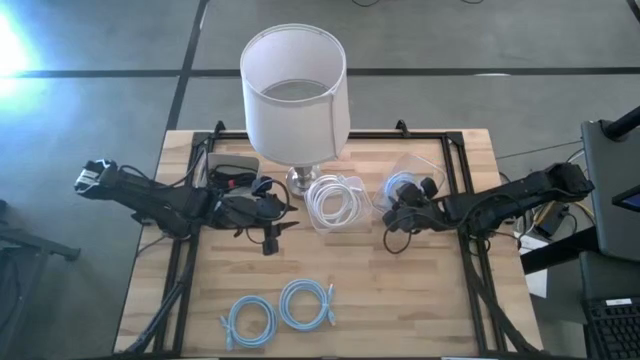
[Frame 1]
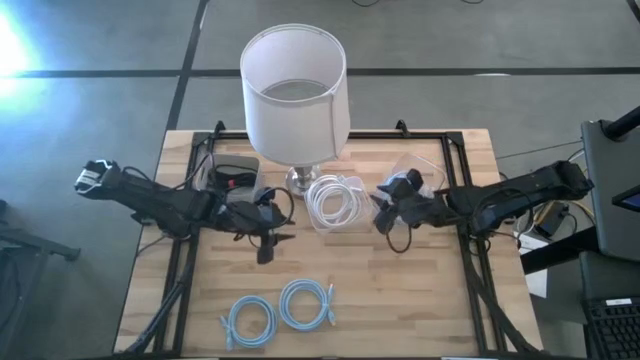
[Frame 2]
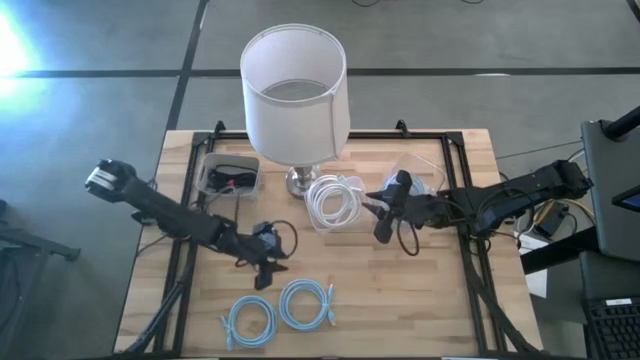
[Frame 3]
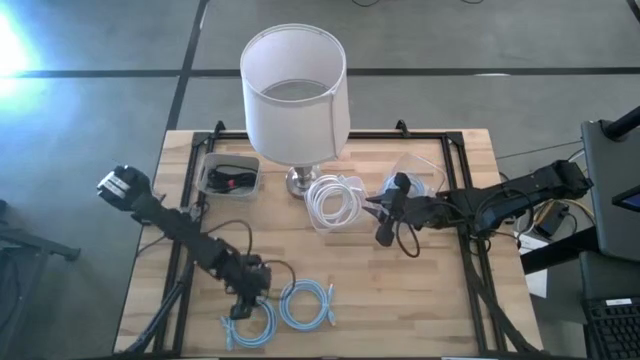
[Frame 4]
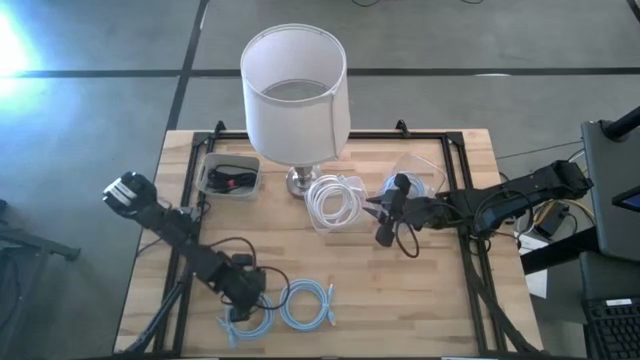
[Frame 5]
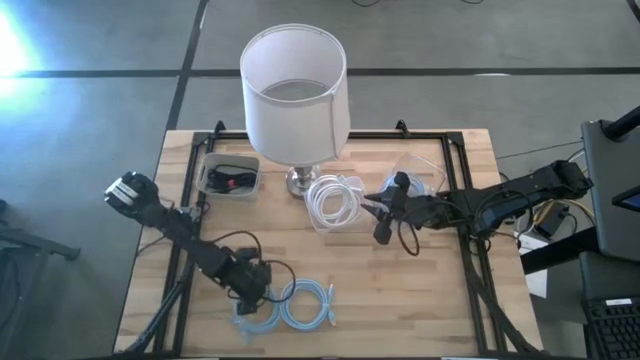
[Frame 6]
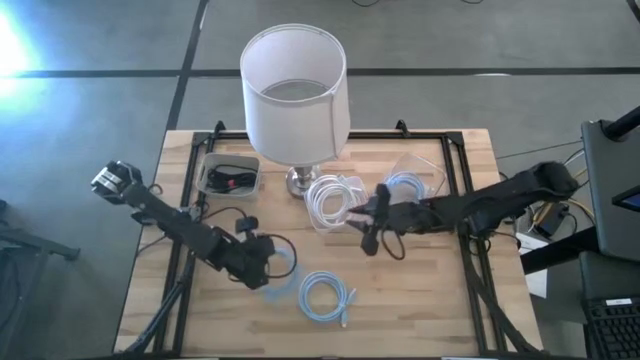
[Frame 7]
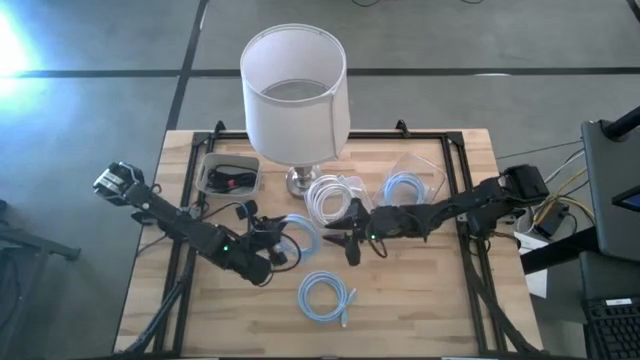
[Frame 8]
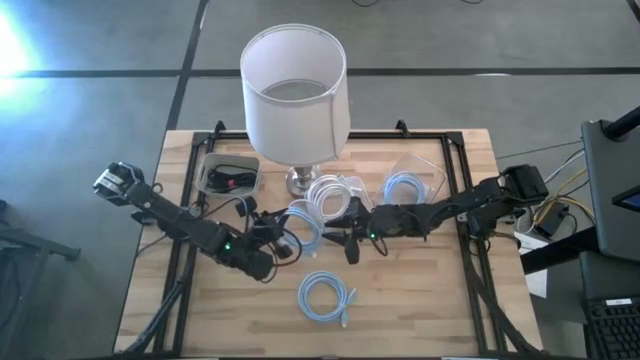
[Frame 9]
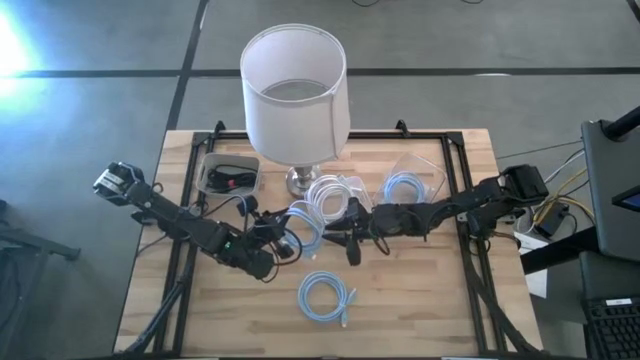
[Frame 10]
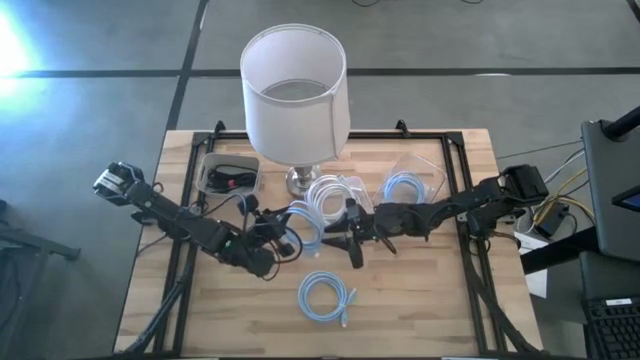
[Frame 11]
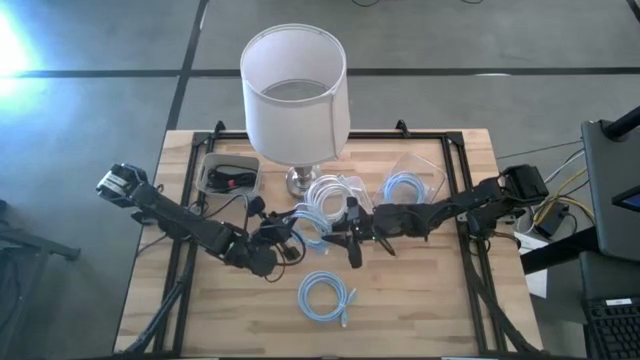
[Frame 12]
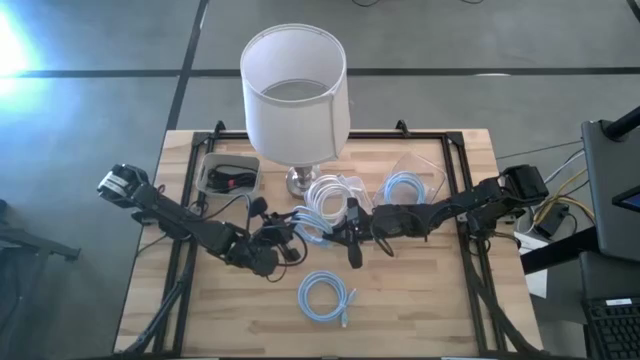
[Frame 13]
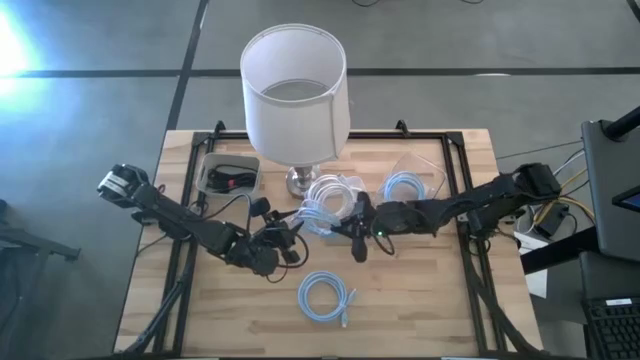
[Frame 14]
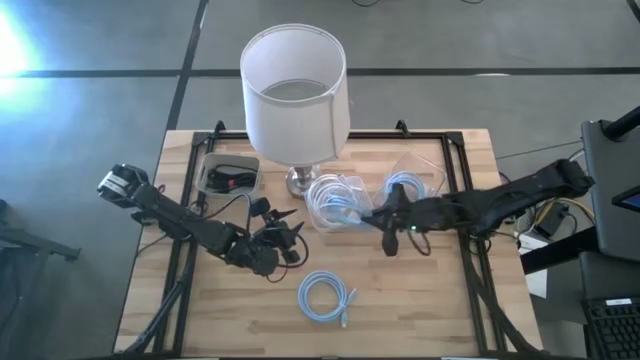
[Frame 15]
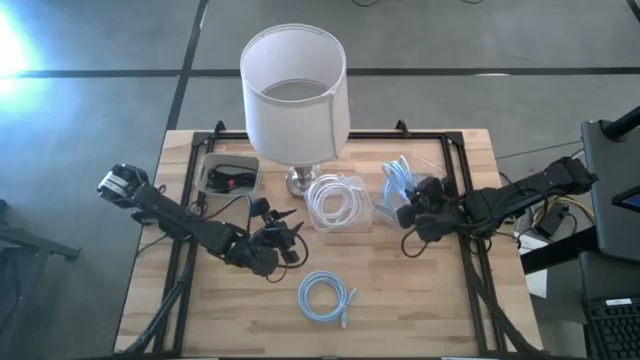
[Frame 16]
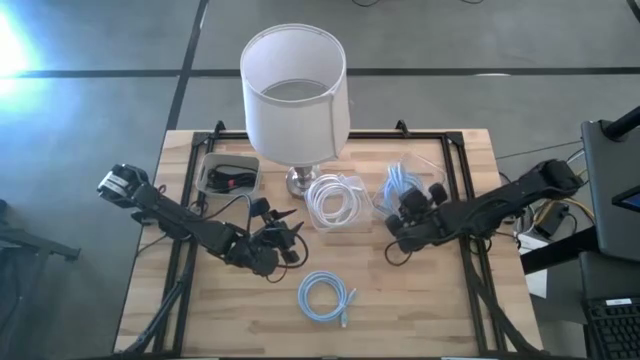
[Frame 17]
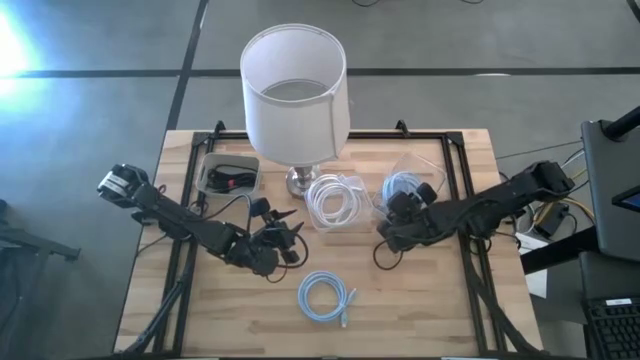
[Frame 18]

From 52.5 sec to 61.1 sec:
Task: Pick & Place USB Port
Put the left light blue USB cable into the right transparent bin

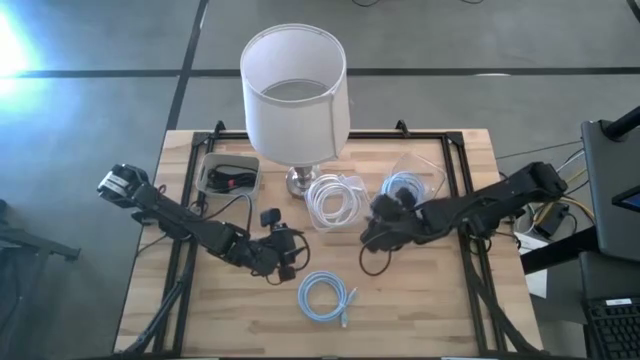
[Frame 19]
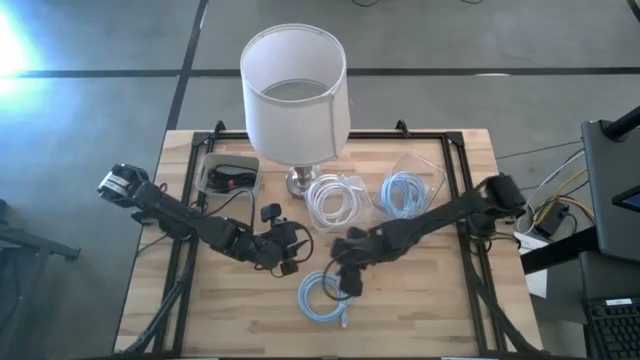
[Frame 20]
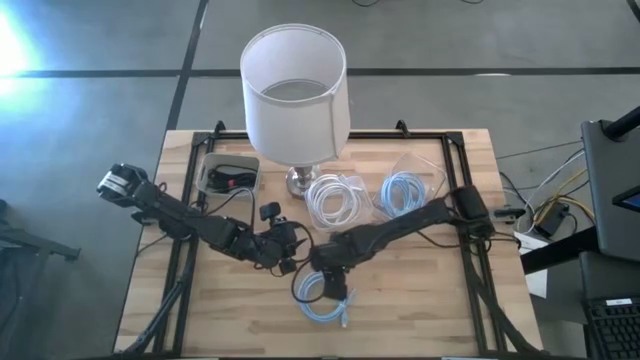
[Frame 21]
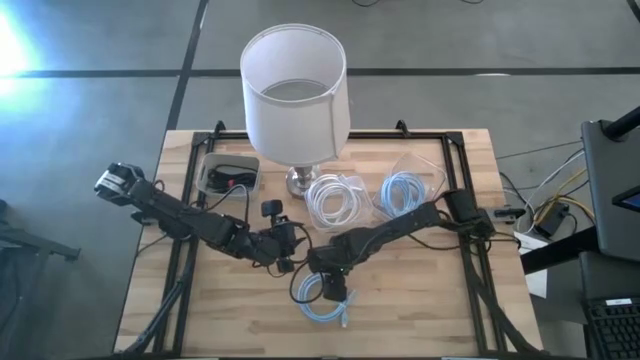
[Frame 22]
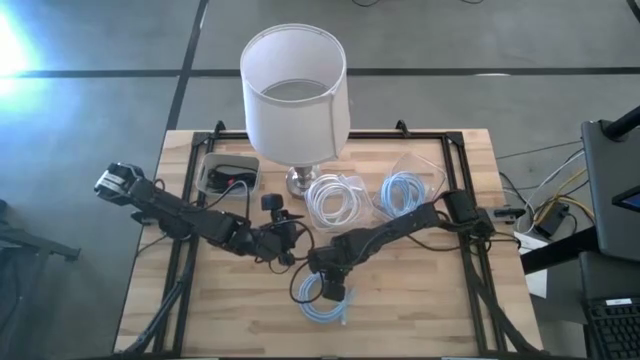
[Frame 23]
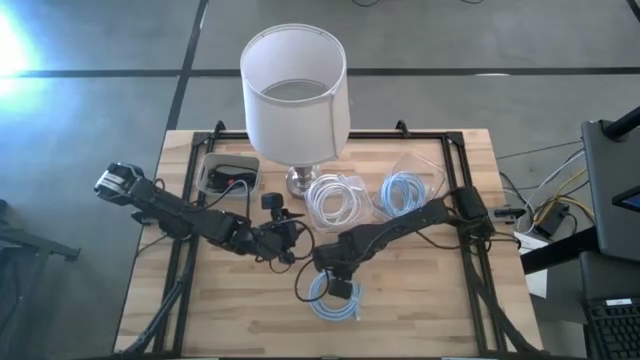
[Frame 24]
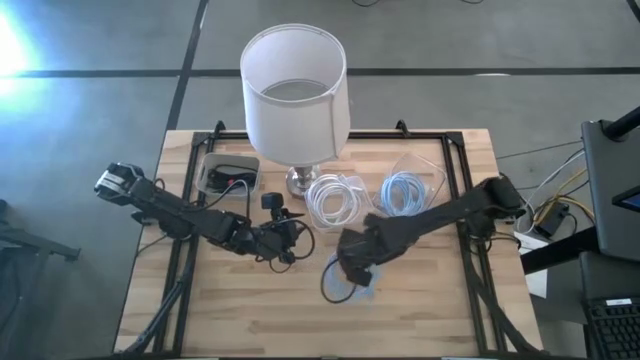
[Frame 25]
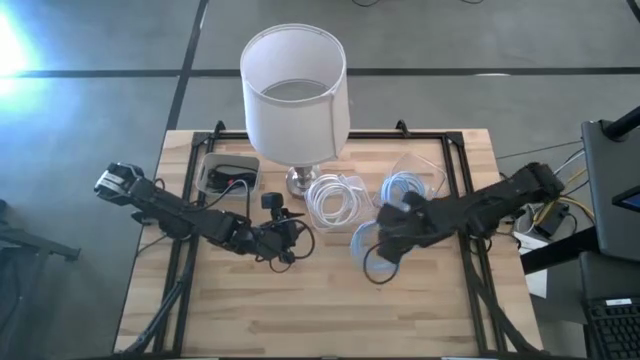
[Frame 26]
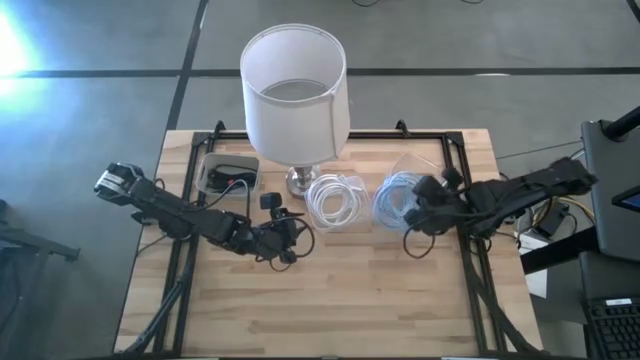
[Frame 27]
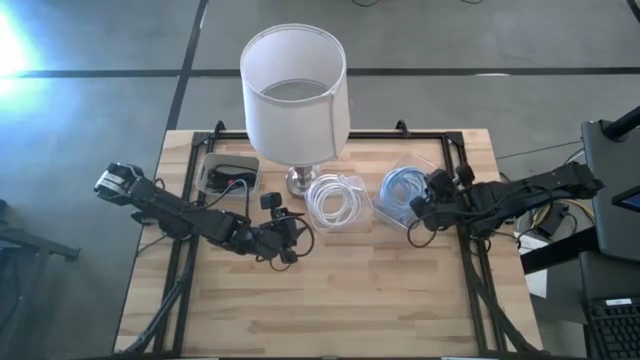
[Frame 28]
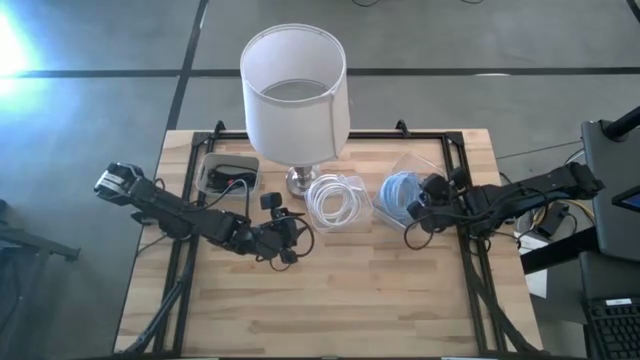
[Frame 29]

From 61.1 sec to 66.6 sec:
Put the light blue USB cable into the right transparent bin

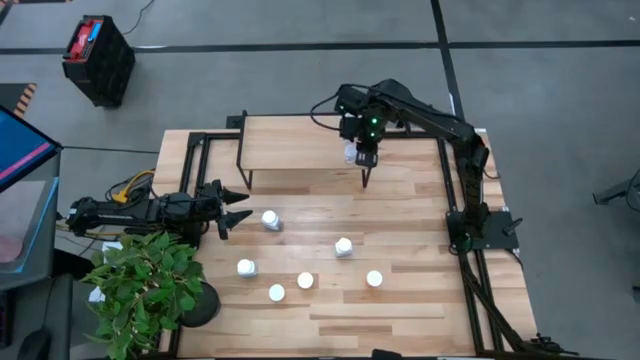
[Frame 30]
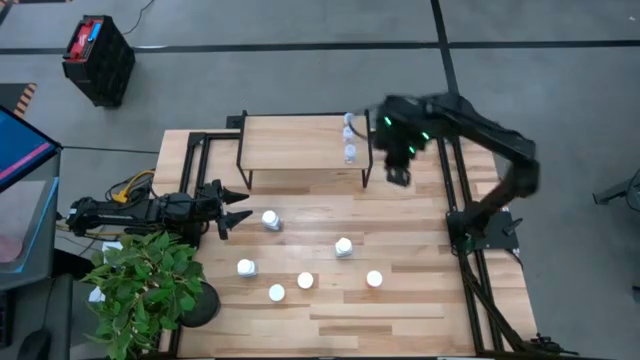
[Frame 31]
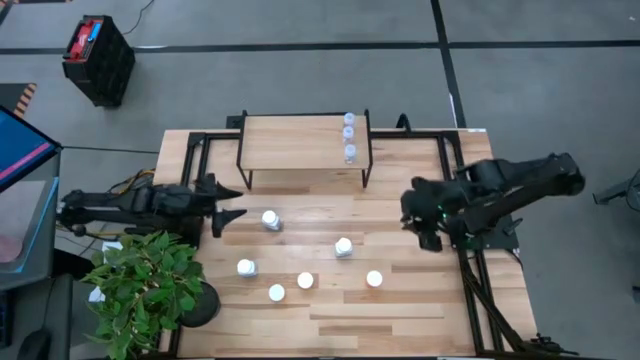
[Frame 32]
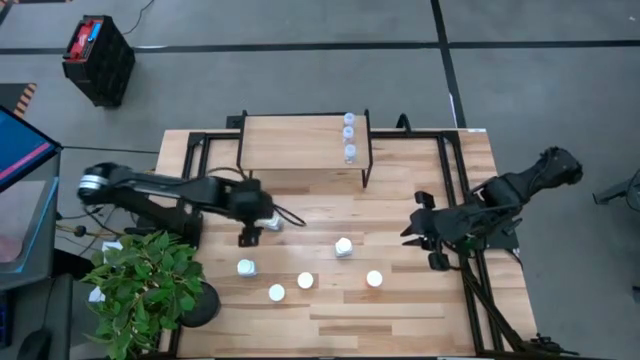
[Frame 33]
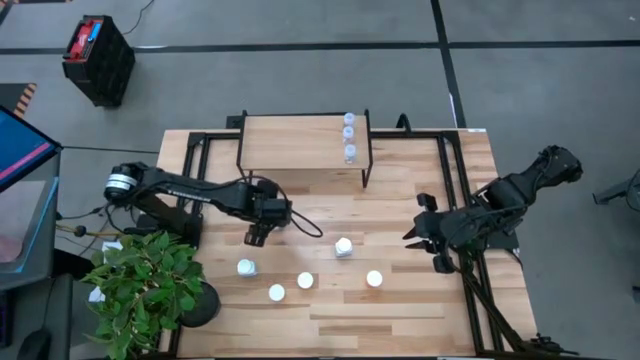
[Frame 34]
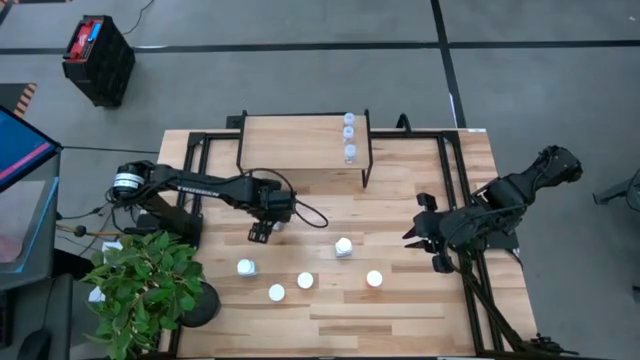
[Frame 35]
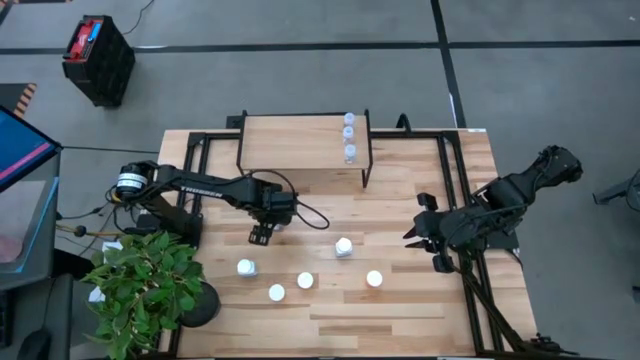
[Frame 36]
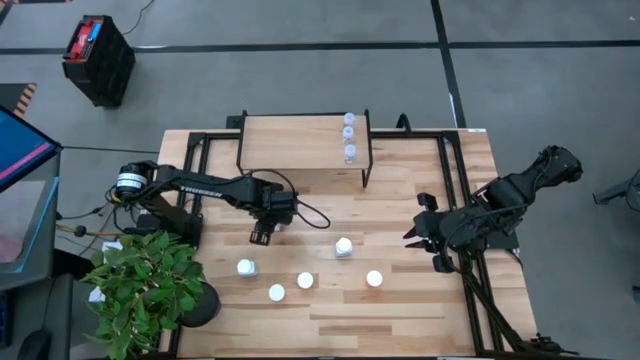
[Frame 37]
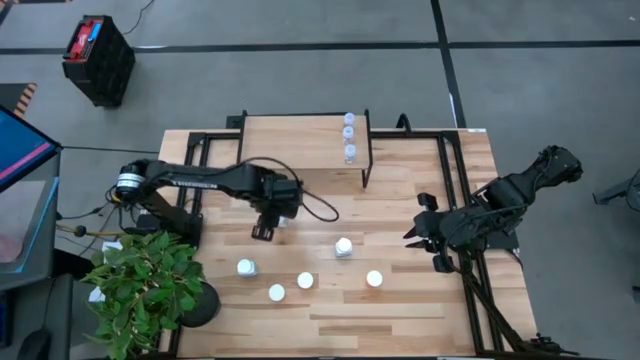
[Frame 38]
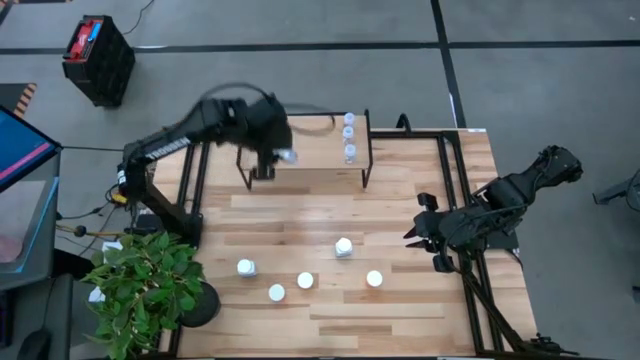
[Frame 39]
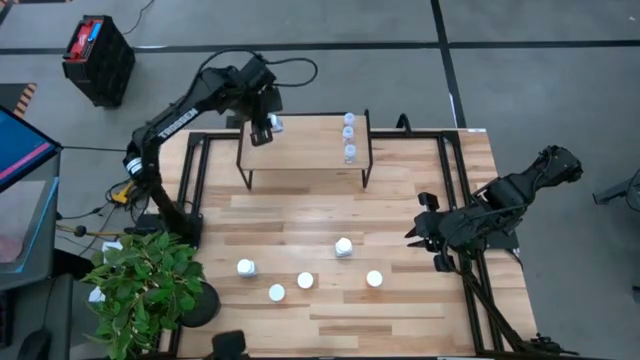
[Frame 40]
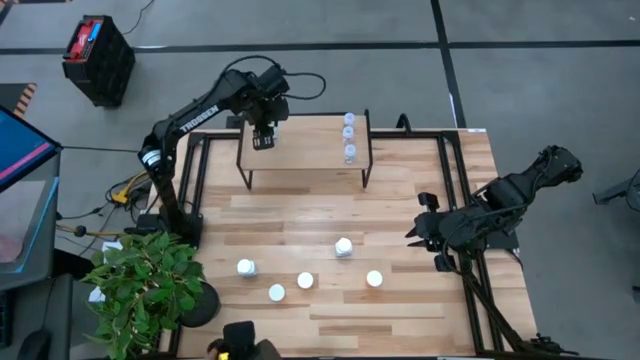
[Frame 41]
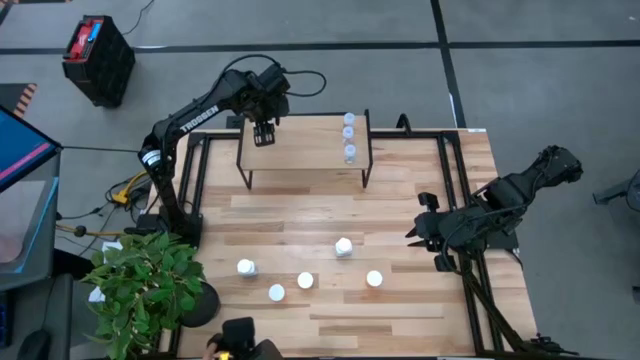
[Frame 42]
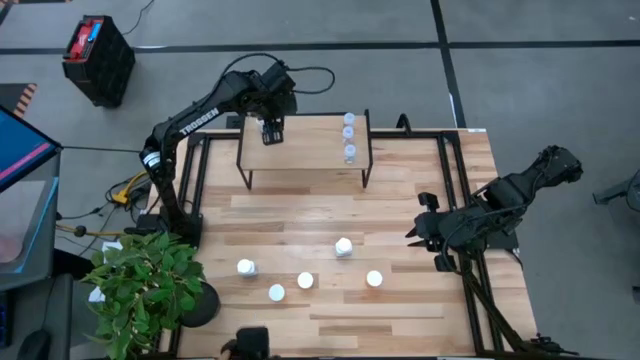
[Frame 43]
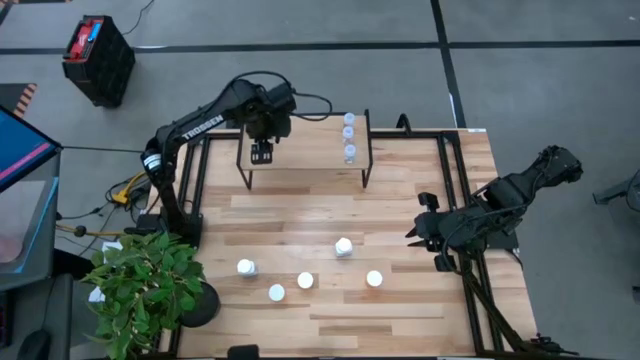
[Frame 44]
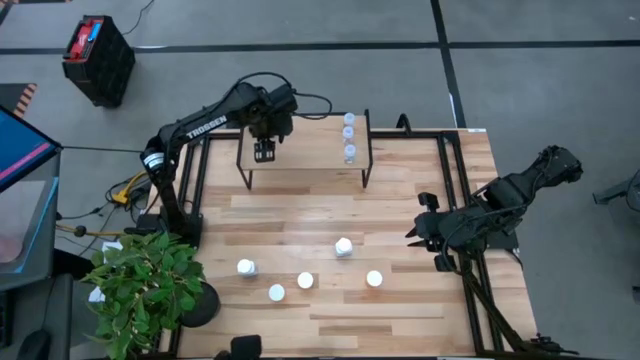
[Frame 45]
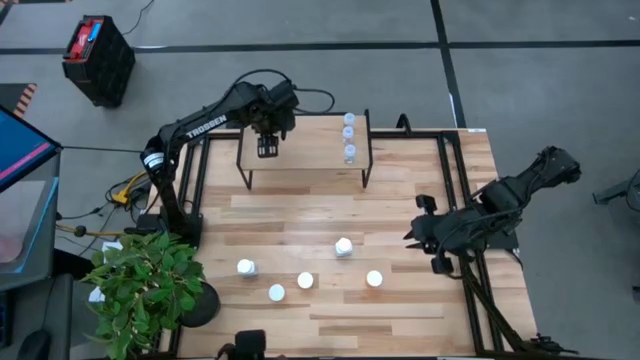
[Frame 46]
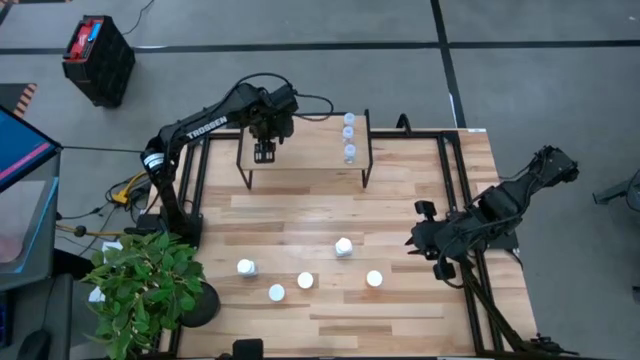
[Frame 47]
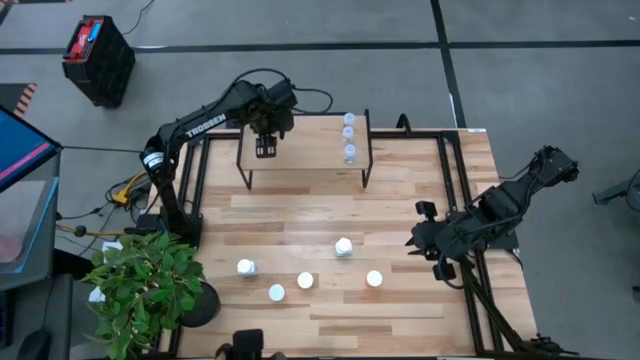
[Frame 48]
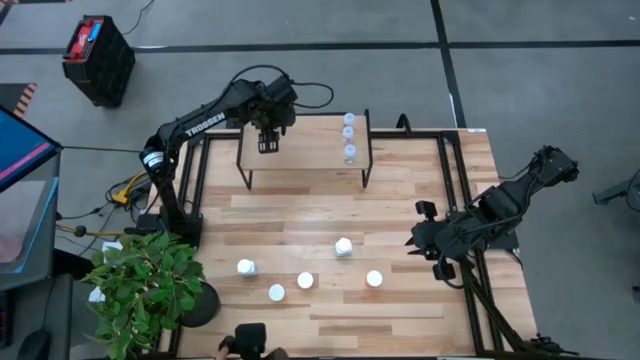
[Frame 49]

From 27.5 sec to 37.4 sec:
Task: Pick and place medicine bottles onto shelf by color
Put the top white pill bottle on the shelf
